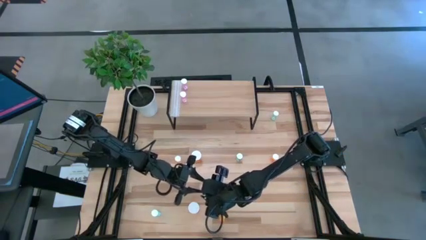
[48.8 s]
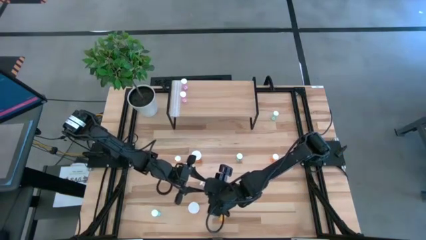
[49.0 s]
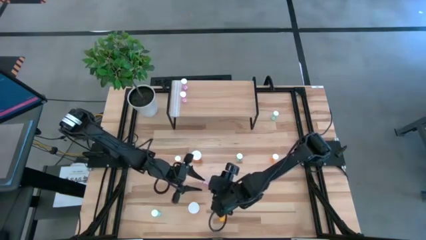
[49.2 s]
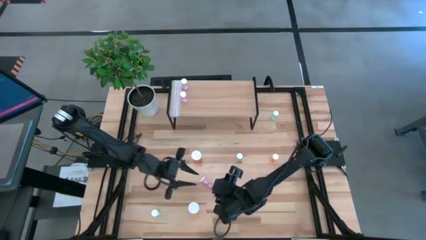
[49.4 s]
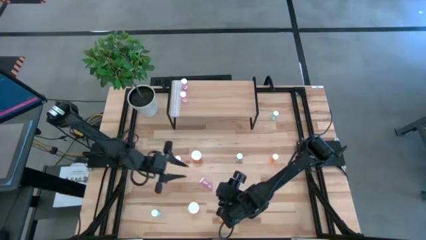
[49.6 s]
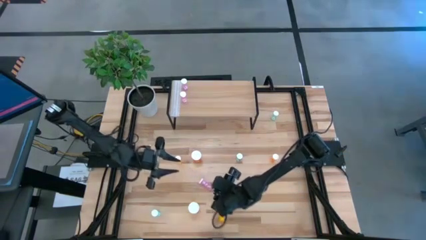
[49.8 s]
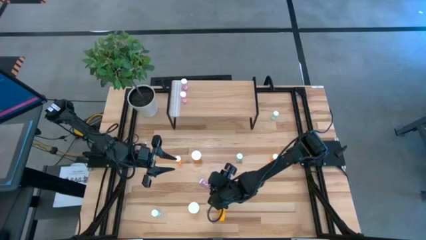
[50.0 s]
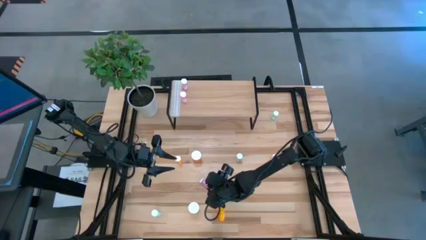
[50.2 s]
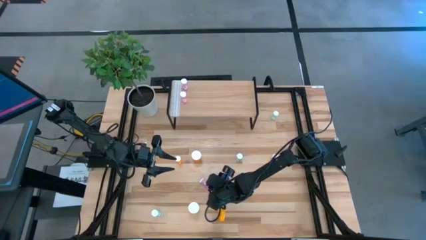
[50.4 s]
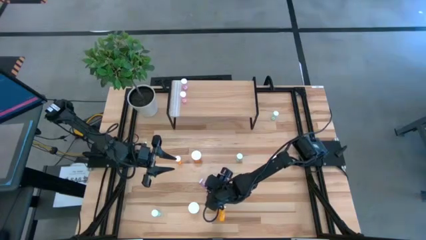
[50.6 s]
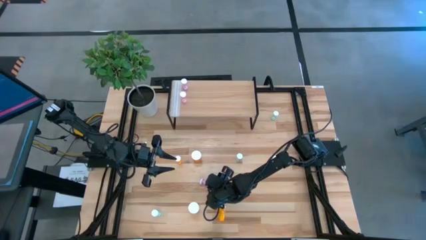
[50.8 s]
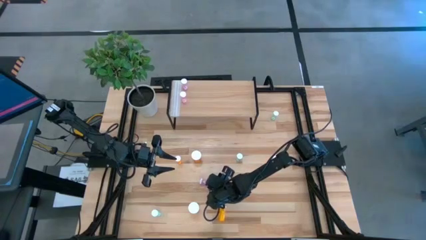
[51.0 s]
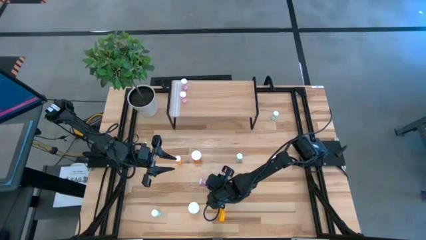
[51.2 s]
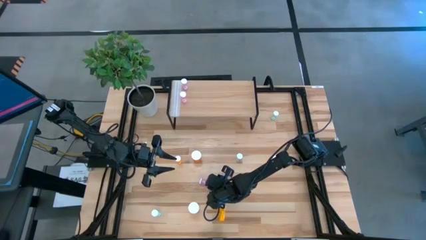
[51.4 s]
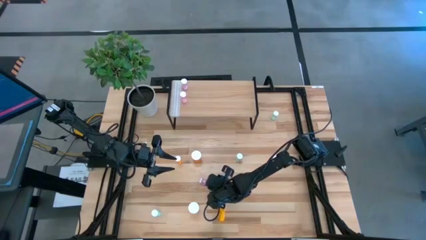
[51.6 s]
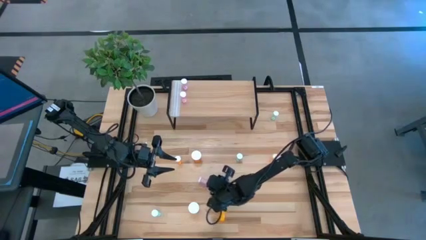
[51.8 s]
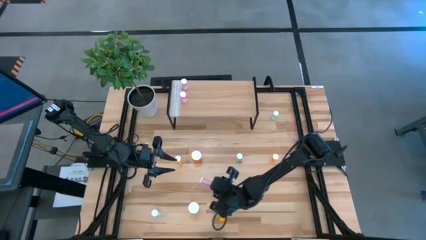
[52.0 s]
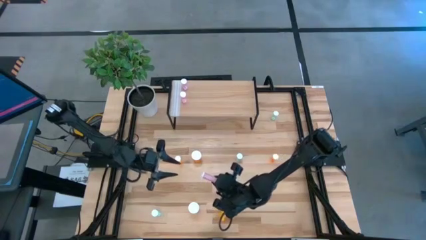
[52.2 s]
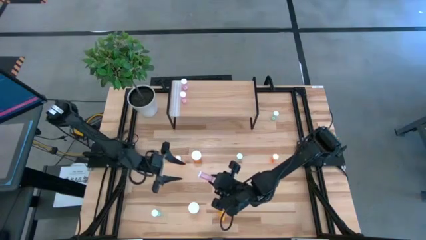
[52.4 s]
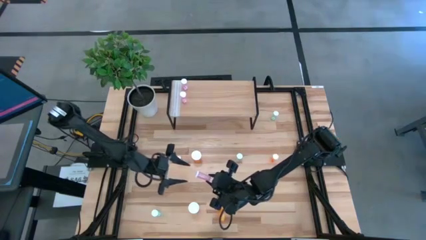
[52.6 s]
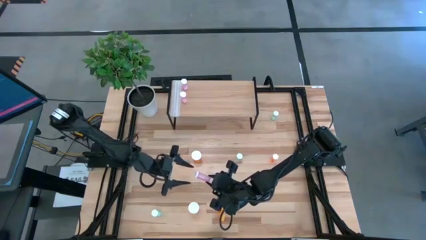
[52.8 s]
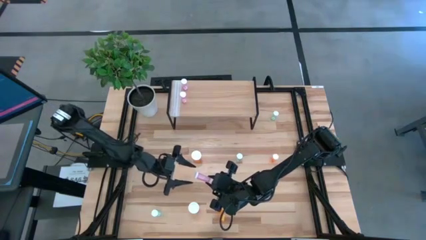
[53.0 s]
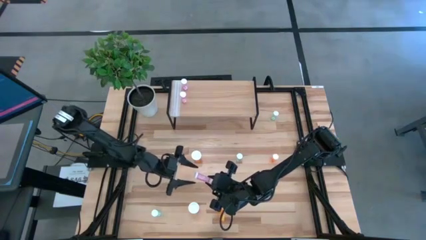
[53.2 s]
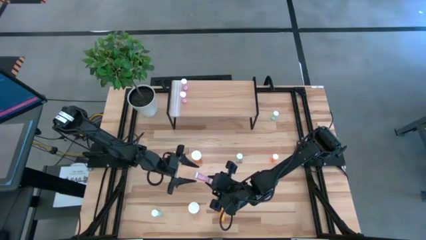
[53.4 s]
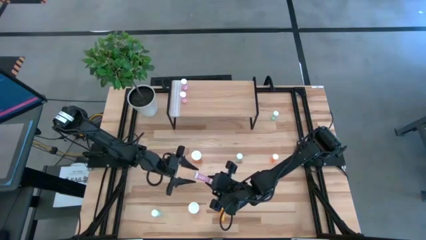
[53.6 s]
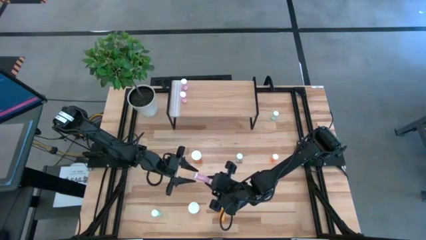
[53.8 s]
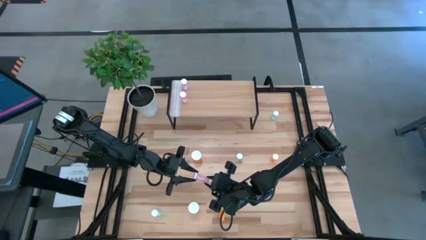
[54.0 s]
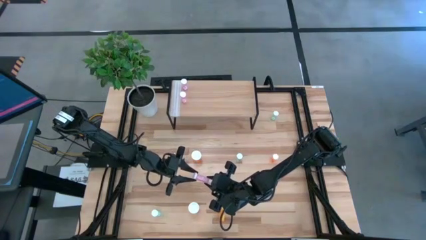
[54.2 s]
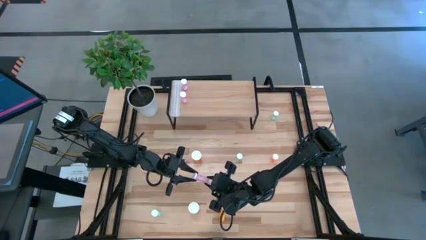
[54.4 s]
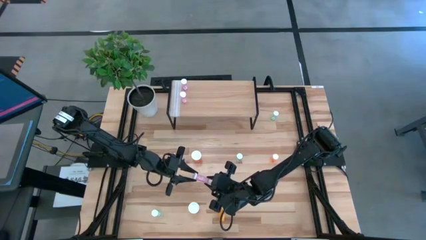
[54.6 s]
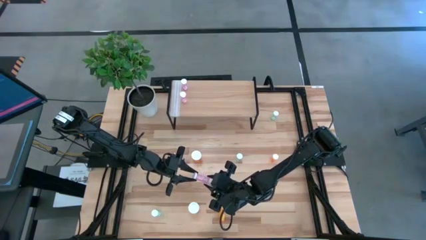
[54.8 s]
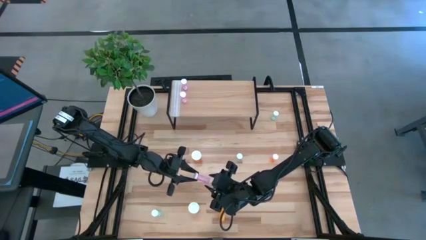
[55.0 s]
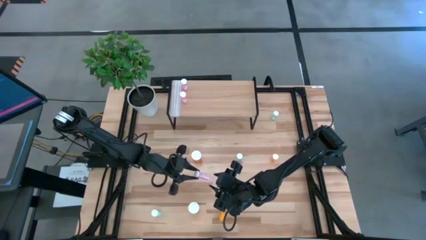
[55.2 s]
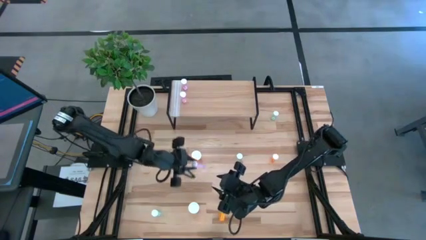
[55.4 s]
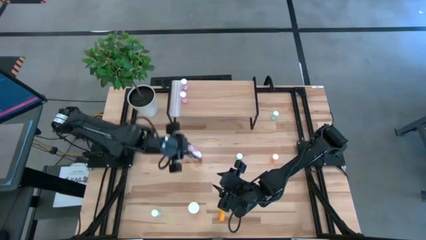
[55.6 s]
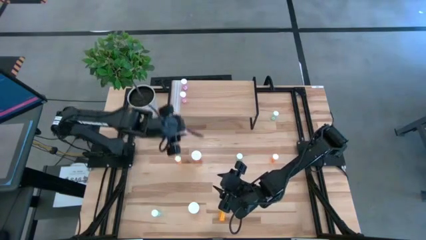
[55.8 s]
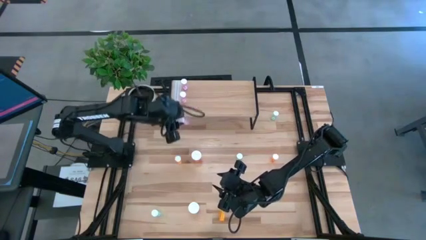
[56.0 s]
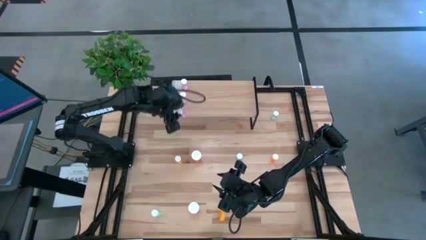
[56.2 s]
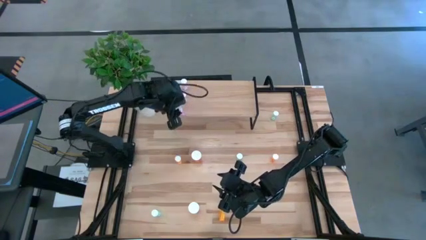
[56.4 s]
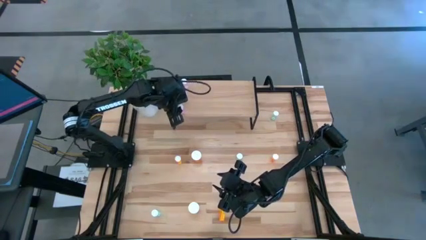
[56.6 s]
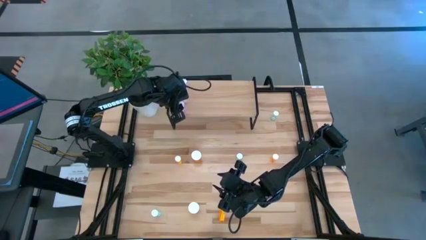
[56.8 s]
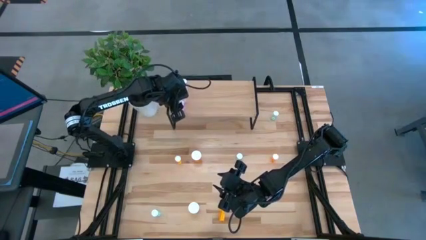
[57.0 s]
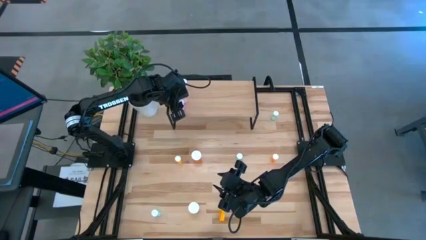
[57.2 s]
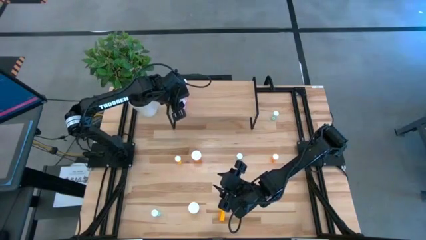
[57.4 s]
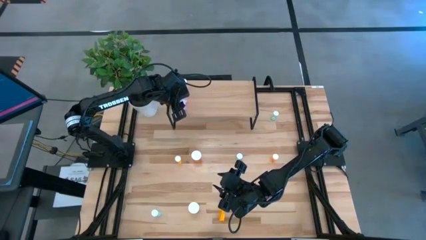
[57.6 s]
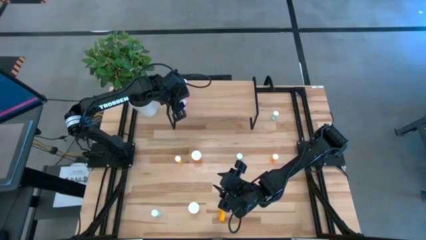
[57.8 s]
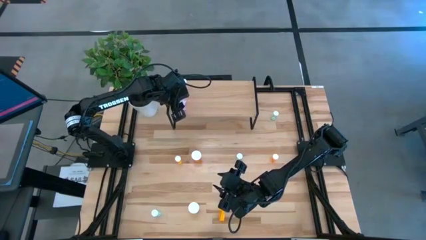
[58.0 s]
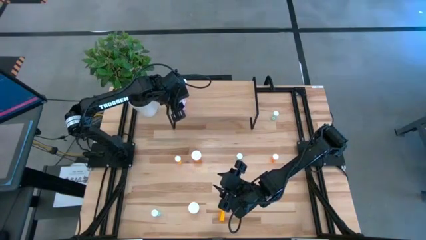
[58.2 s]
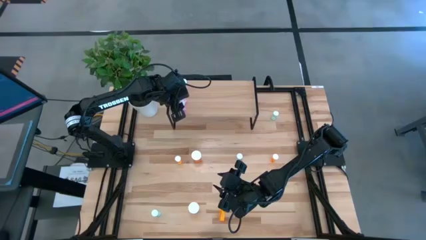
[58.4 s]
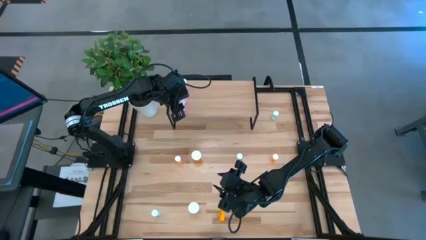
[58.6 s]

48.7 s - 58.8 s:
Task: Pick and place medicine bottles onto shelf by color
Put the pink pill bottle on the shelf aligned with the other pink pill bottles

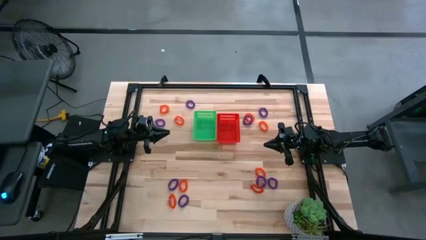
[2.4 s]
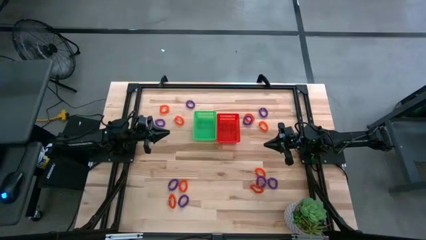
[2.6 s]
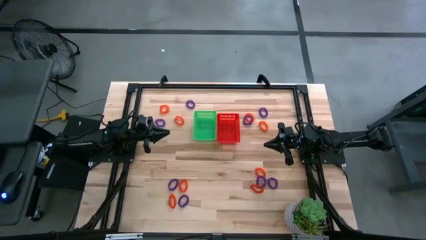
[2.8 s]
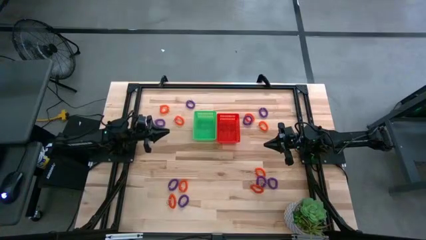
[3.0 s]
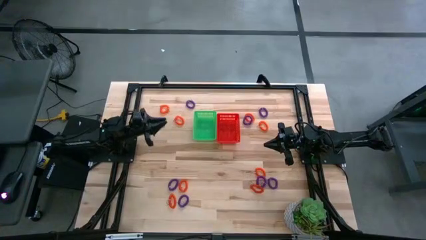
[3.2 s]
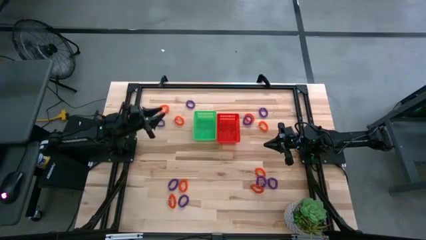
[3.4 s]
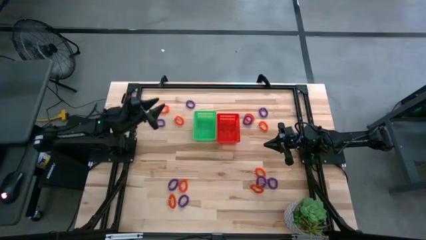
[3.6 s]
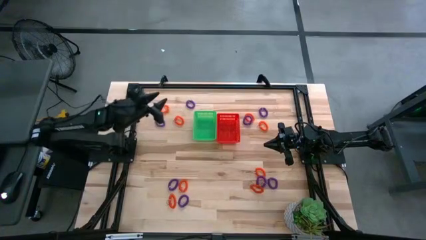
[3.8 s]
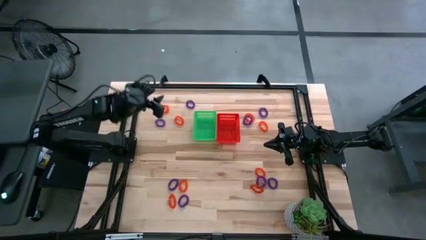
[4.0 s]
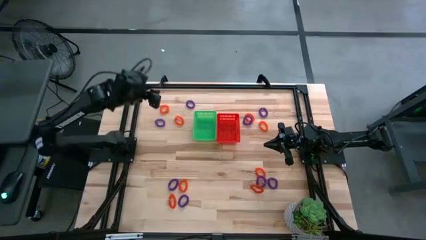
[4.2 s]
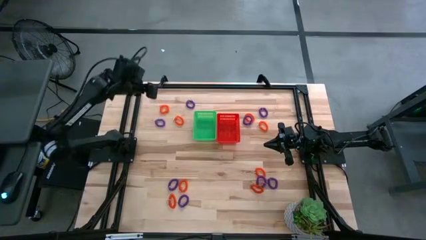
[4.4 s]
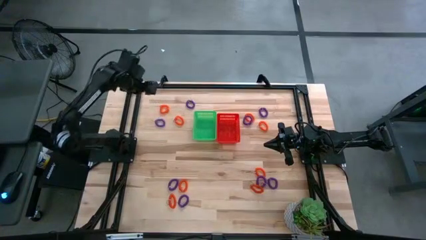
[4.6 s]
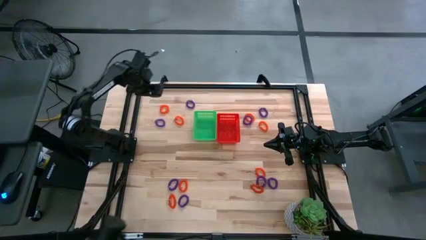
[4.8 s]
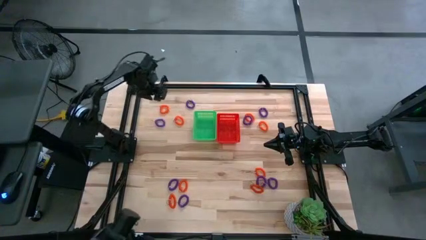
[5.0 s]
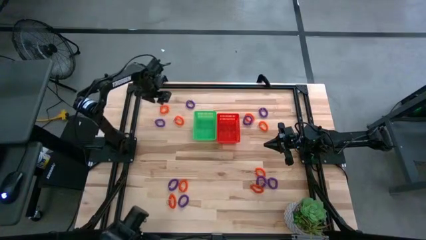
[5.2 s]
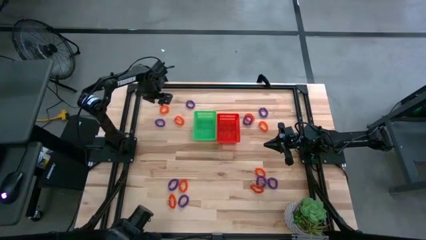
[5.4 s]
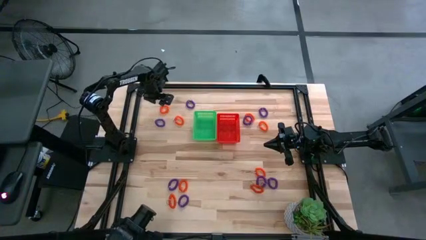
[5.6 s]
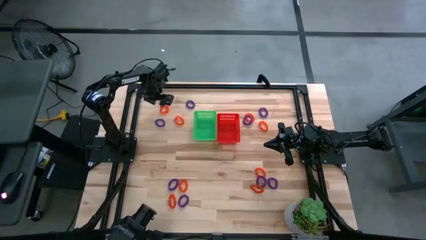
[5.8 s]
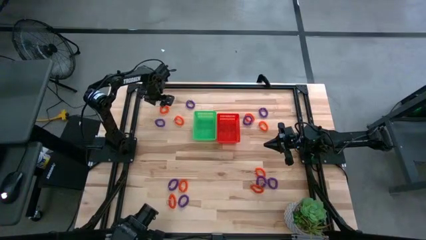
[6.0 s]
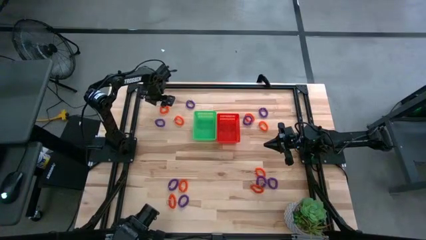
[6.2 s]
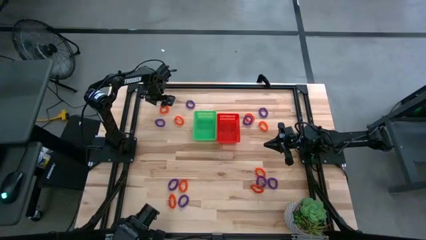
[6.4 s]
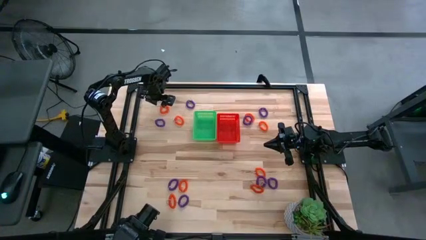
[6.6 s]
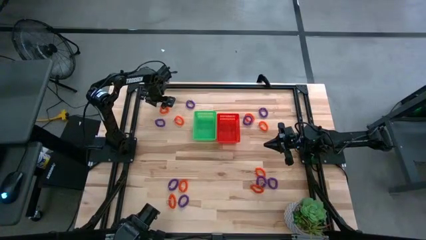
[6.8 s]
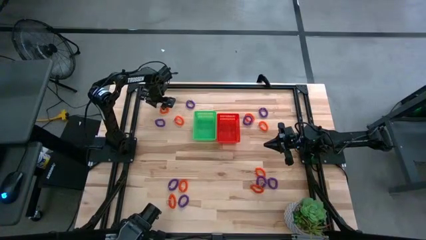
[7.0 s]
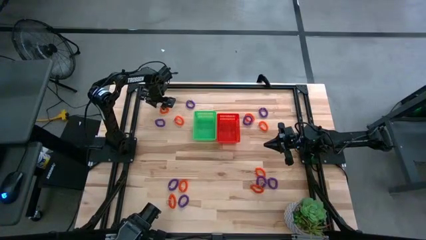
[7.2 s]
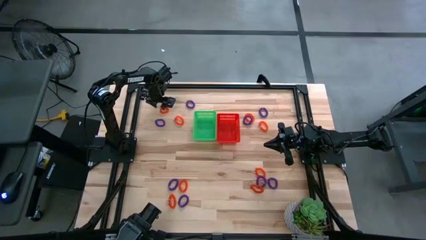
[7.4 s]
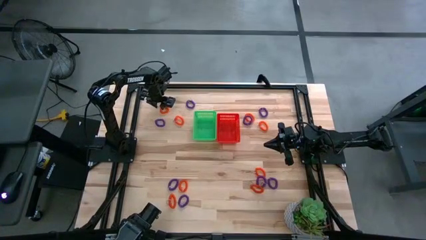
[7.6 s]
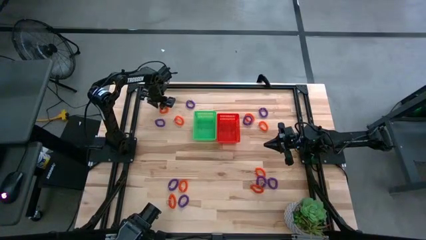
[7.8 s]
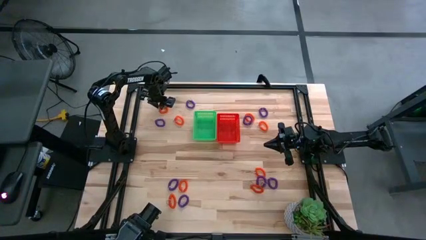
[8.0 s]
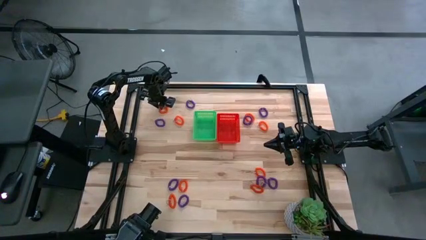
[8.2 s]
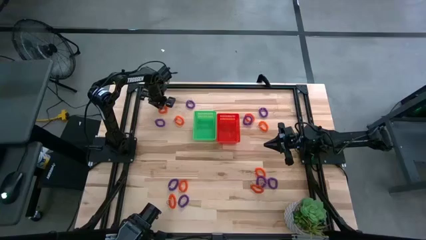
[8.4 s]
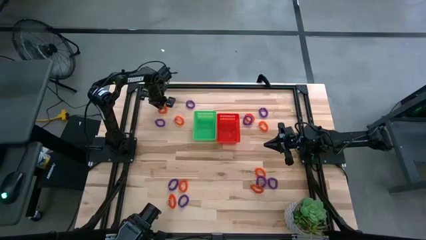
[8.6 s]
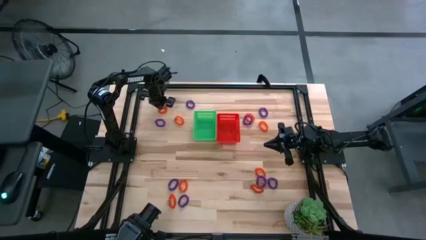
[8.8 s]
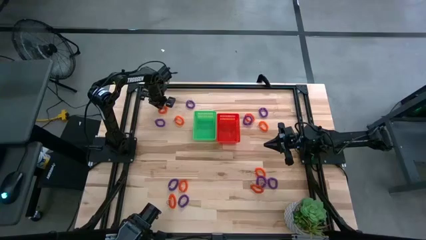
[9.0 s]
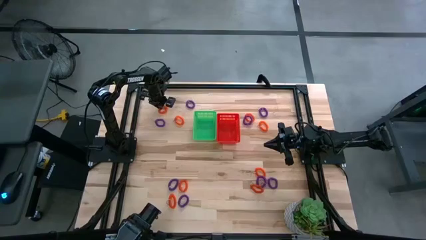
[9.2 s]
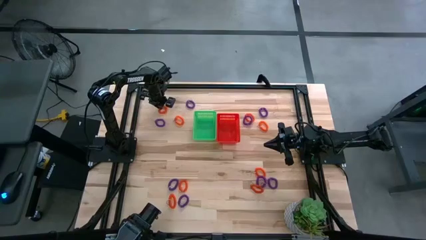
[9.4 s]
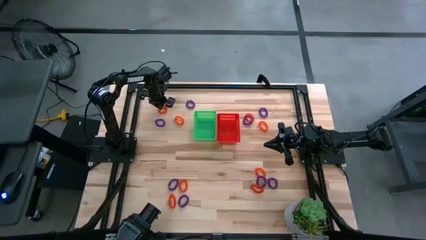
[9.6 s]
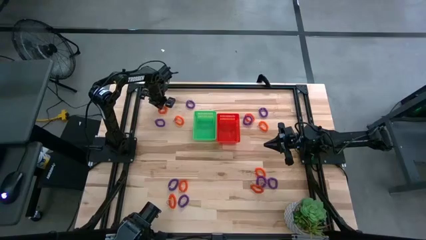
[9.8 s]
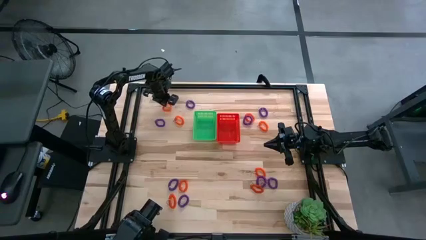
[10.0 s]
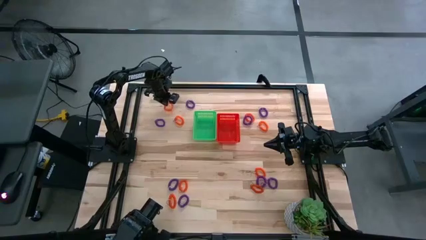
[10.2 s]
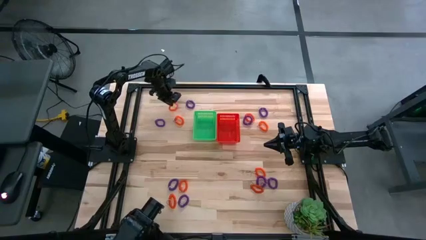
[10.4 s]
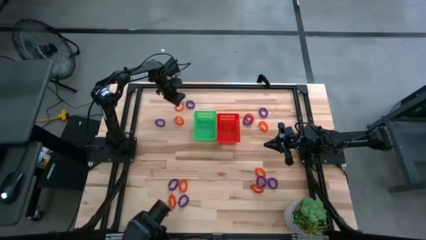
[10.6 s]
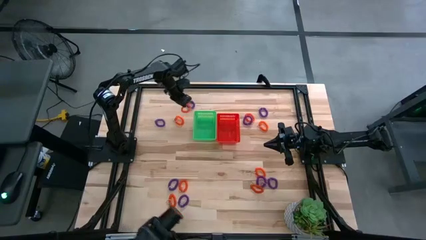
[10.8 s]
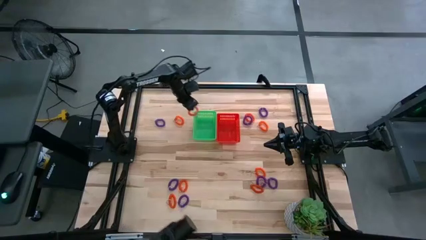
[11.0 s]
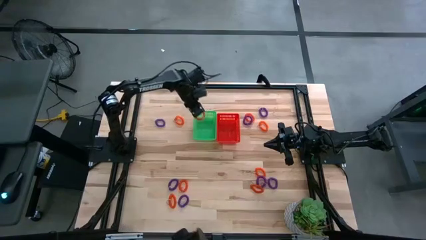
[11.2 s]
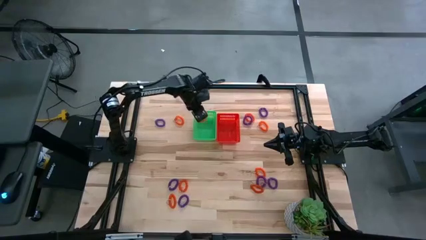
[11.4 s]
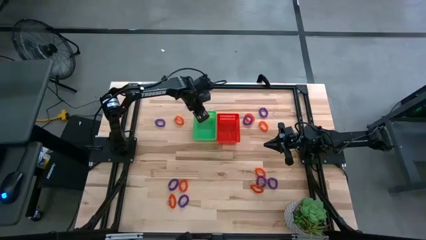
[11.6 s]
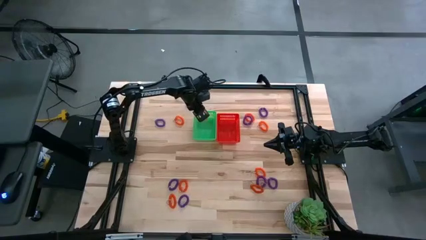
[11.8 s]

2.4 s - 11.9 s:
Task: Sort spring keychains
Put the orange spring keychain into the green bin
